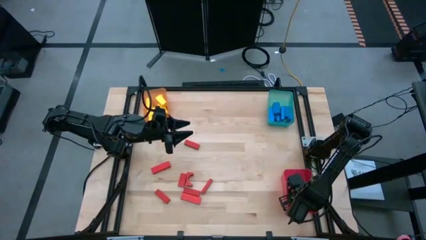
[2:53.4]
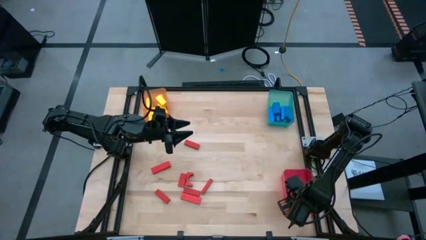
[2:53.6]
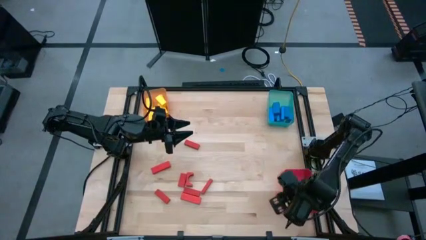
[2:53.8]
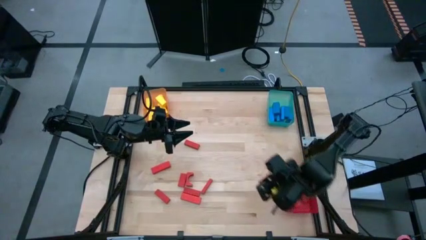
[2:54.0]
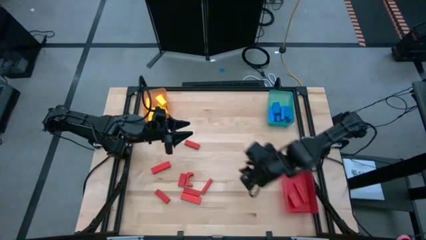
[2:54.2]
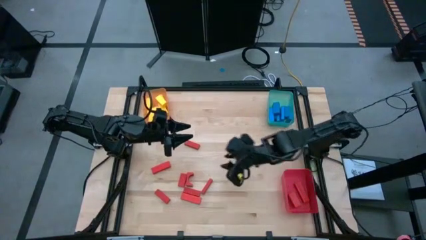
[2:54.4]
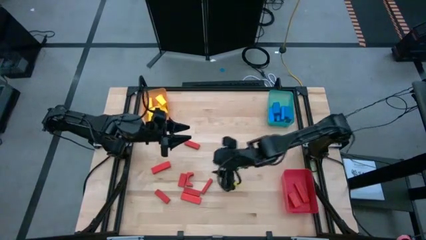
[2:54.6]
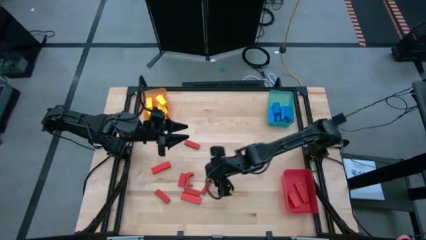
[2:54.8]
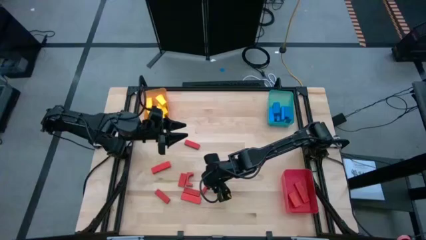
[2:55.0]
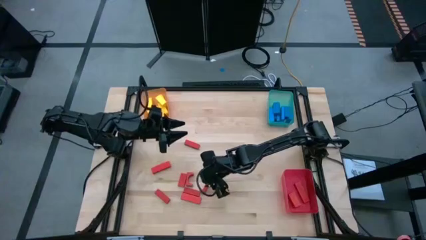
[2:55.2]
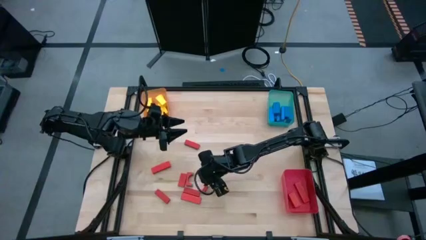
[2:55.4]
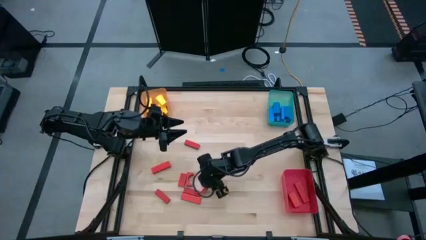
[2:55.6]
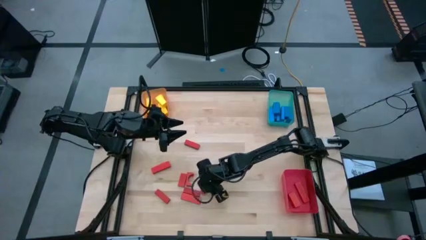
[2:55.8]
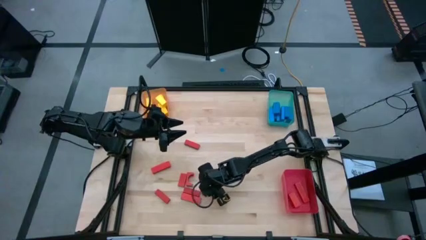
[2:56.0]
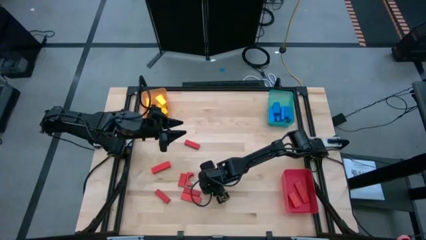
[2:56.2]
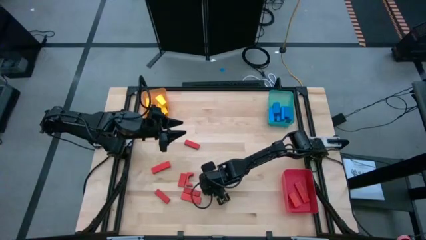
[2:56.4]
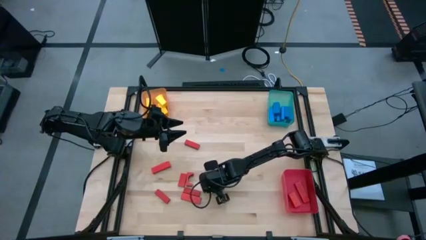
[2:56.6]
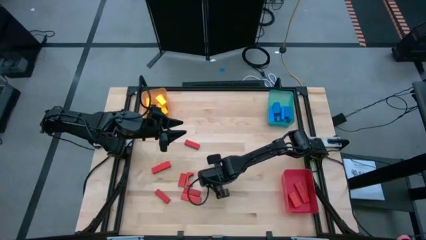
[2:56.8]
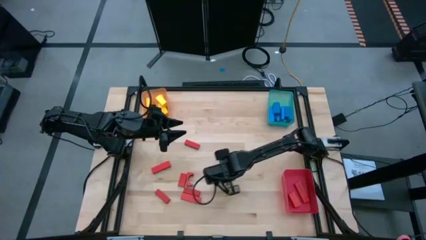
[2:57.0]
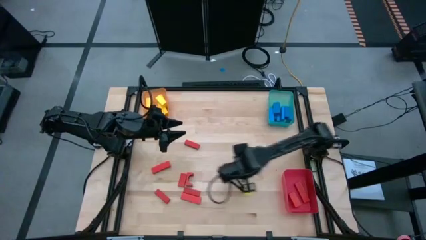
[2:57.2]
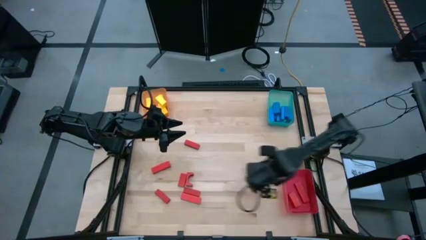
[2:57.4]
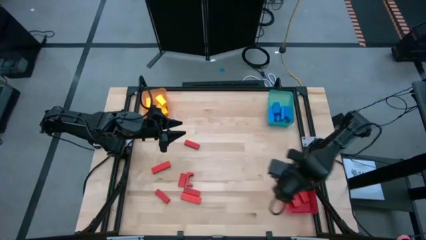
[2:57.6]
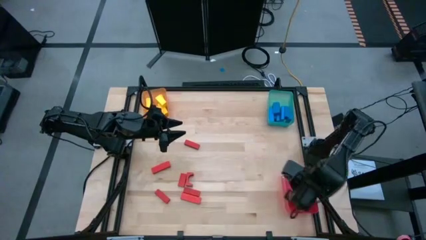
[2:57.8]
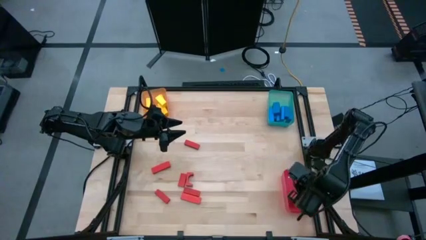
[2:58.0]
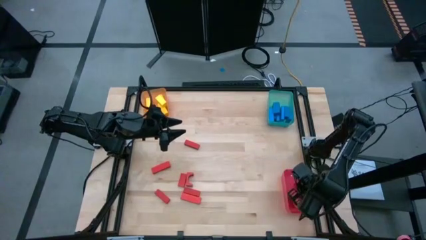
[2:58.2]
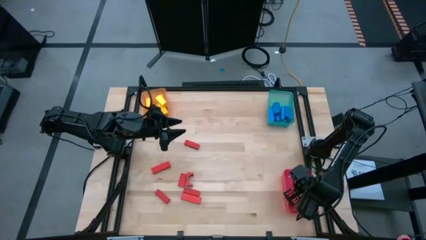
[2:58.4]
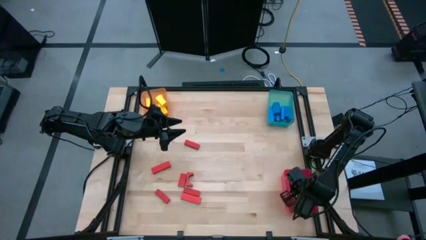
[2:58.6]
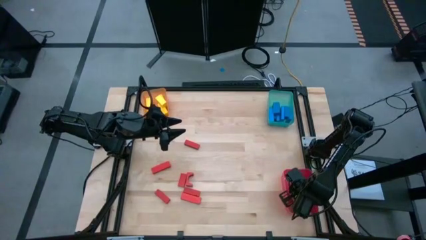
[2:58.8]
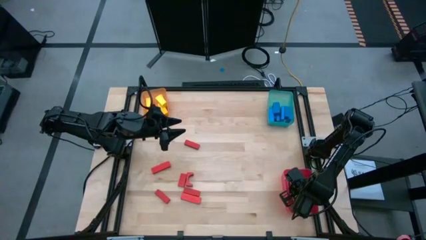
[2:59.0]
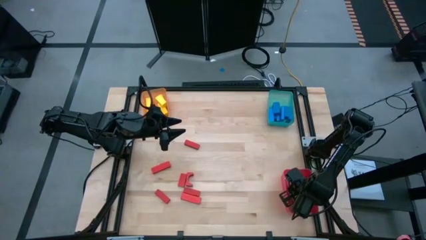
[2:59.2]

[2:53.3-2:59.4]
Task: Sort blocks
Put the red block into the red bin

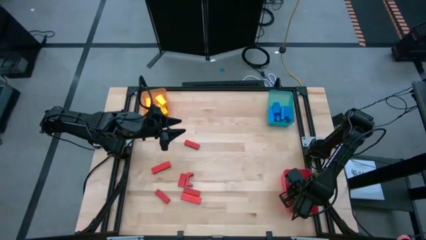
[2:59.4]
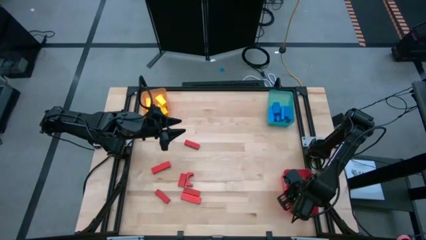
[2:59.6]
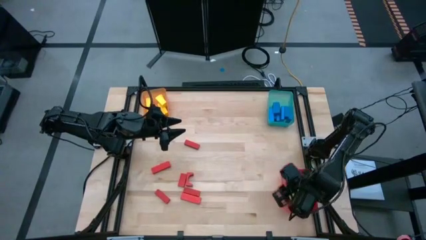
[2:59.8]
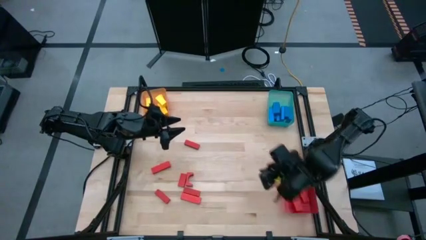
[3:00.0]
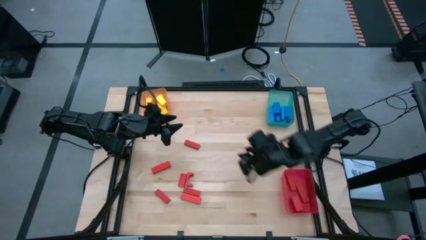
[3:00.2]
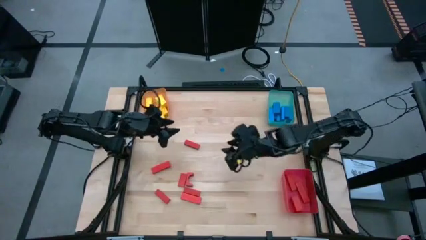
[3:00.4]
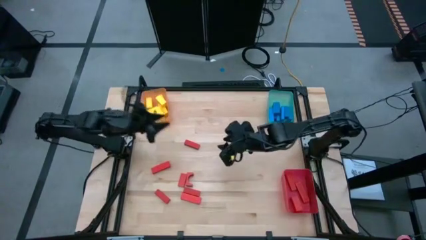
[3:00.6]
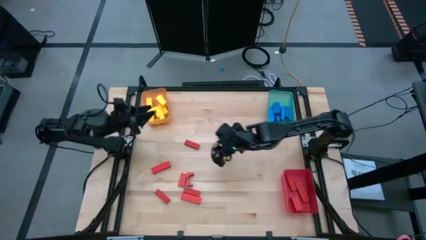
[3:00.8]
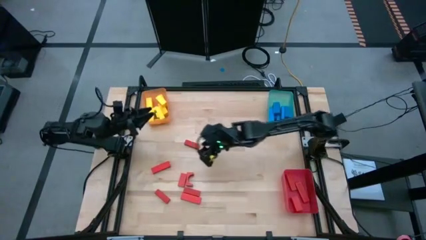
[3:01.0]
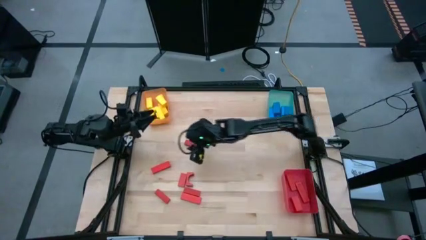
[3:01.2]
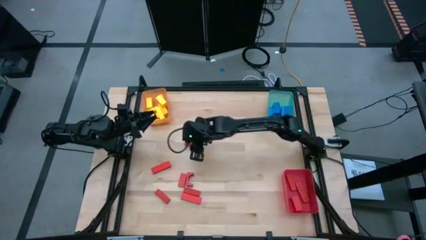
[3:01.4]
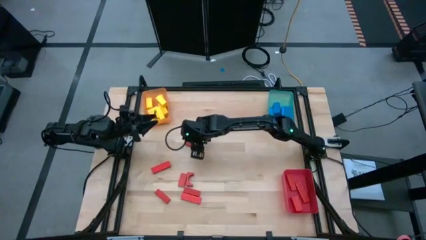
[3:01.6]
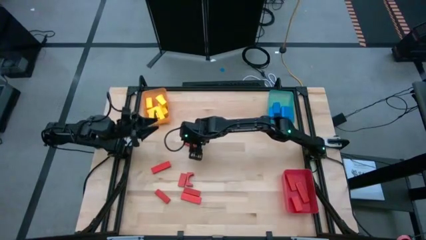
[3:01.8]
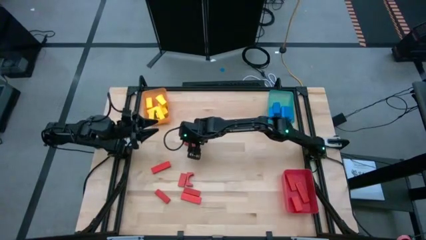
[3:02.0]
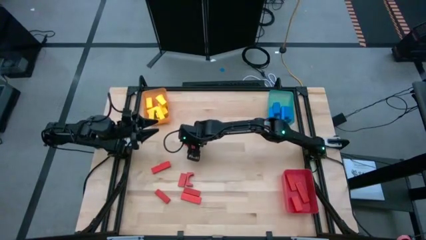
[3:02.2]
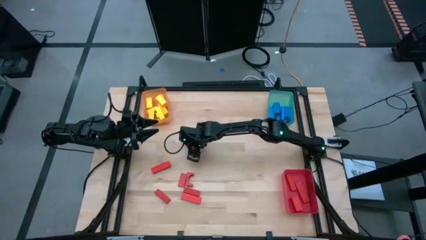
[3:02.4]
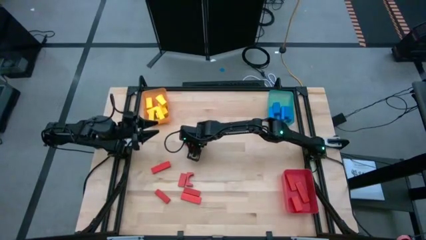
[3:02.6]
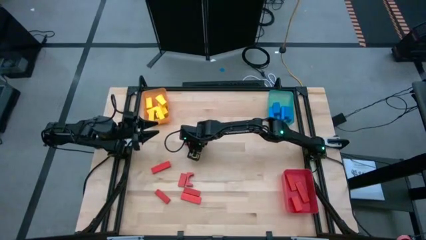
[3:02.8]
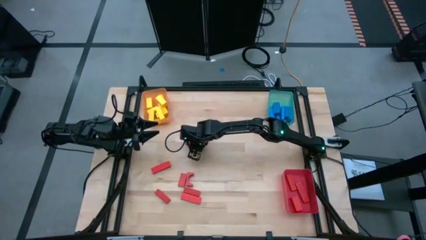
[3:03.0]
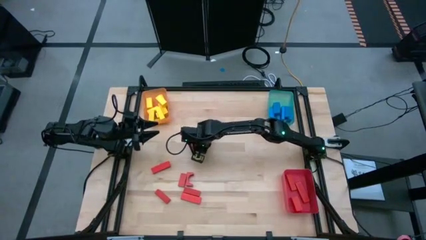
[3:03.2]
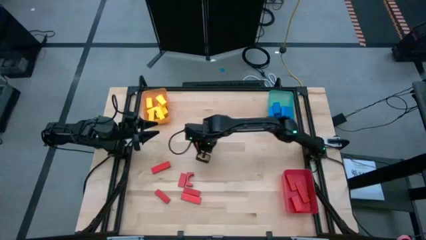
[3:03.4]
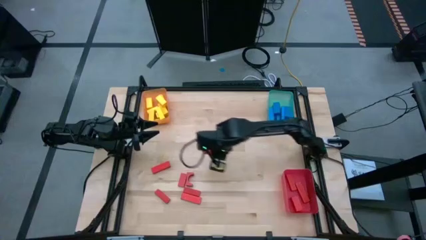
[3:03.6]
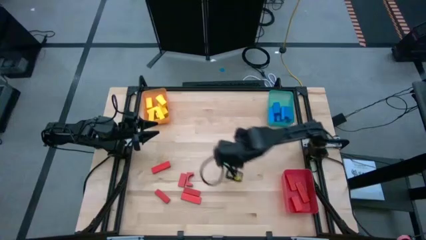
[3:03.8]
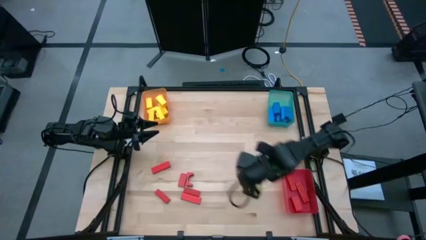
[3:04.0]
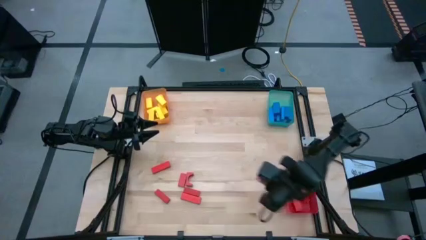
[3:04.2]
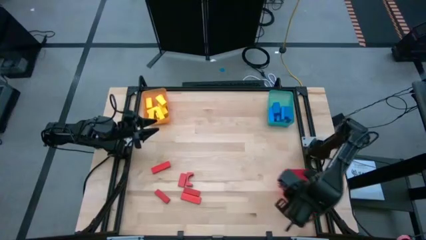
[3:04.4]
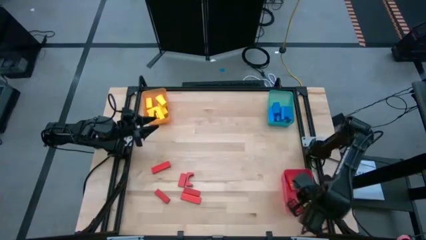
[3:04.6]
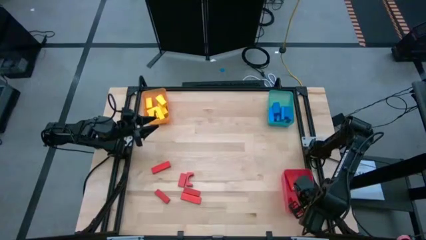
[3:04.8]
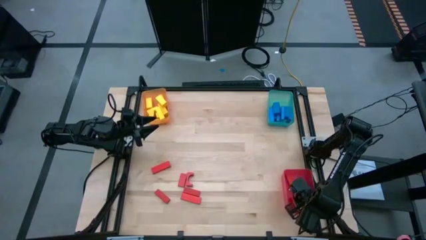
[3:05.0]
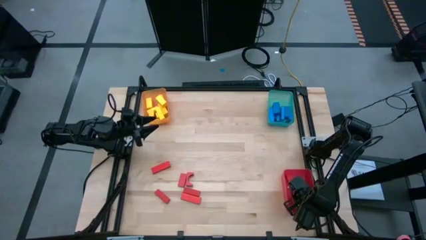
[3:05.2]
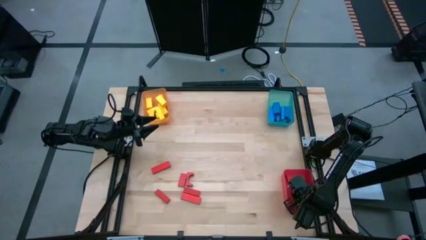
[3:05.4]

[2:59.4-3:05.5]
Put the red block into the red bin

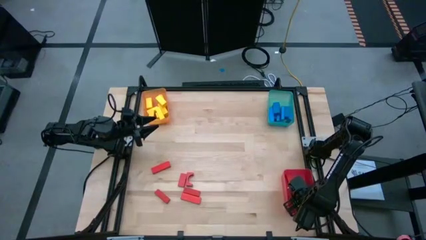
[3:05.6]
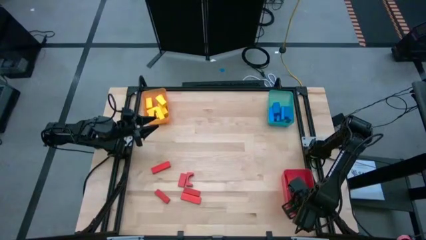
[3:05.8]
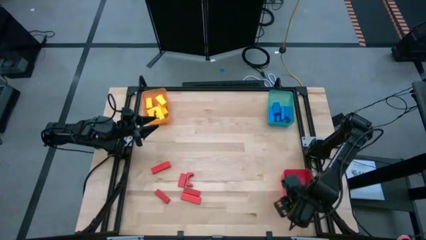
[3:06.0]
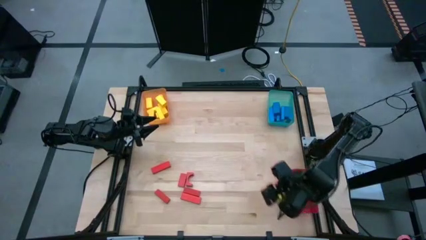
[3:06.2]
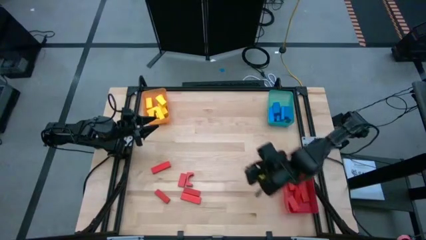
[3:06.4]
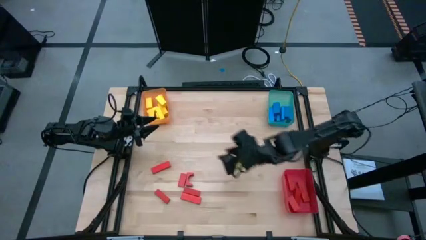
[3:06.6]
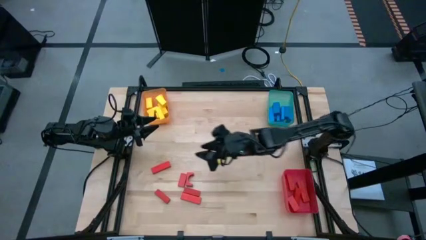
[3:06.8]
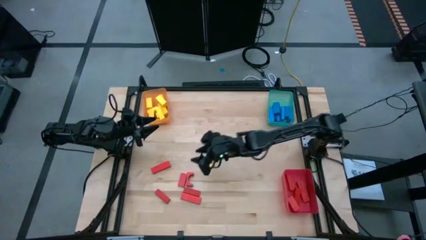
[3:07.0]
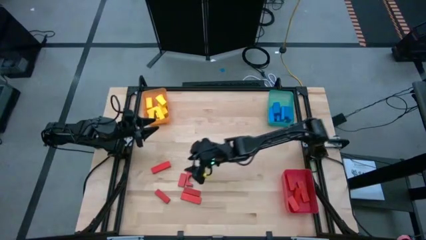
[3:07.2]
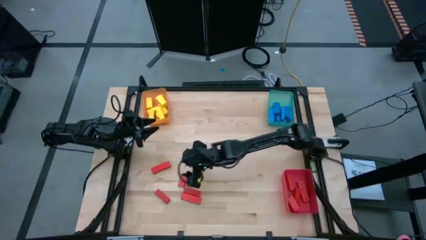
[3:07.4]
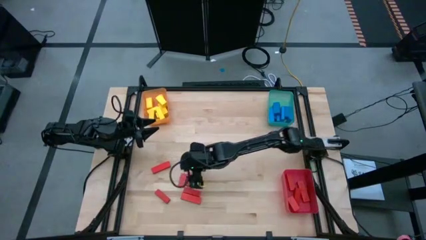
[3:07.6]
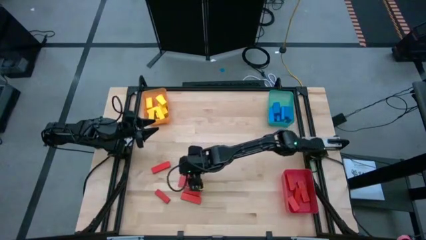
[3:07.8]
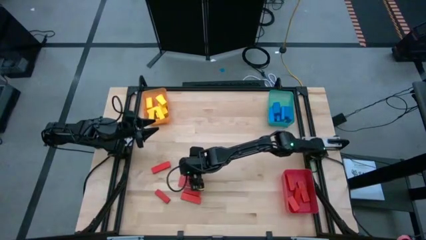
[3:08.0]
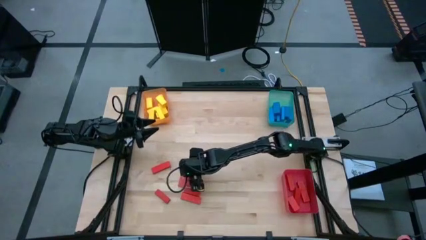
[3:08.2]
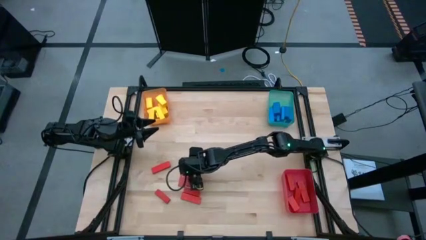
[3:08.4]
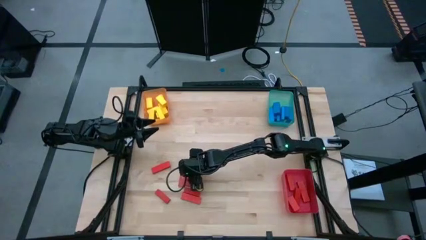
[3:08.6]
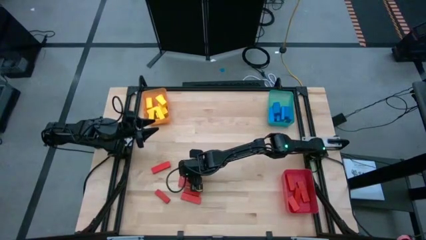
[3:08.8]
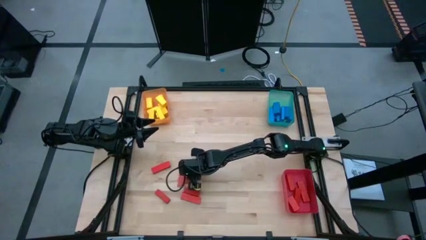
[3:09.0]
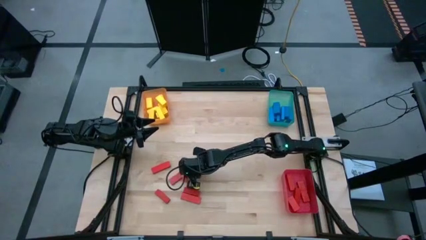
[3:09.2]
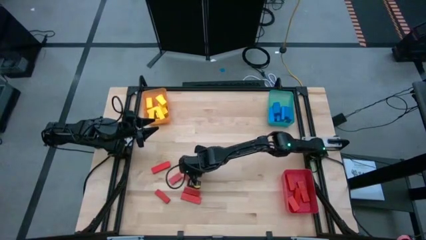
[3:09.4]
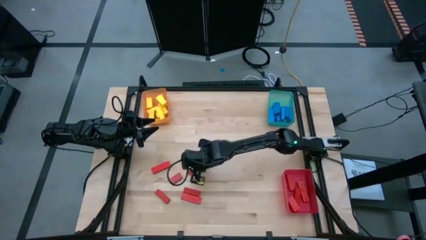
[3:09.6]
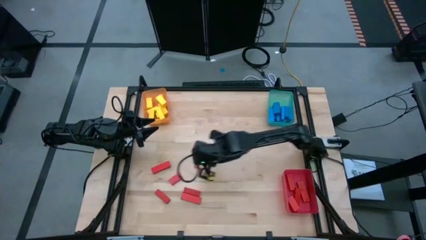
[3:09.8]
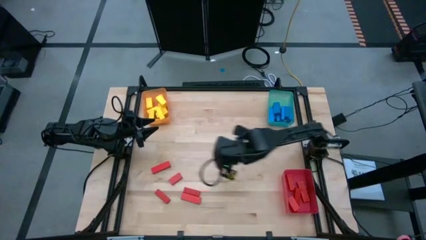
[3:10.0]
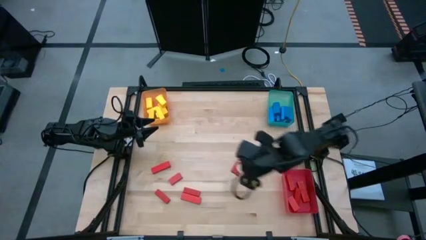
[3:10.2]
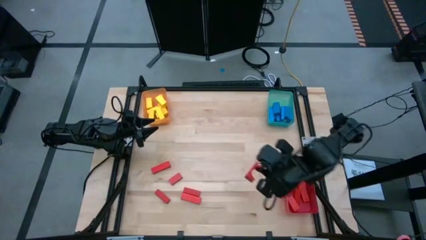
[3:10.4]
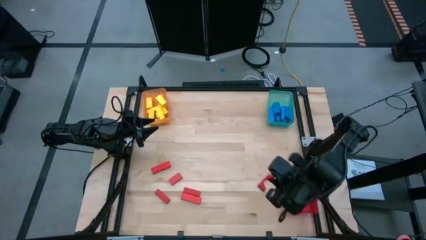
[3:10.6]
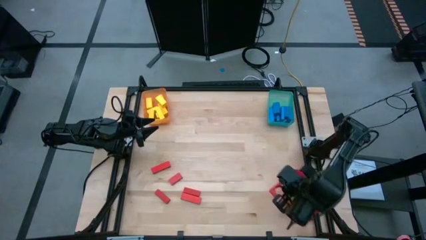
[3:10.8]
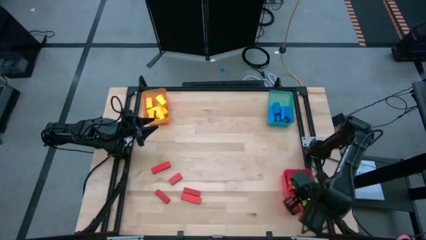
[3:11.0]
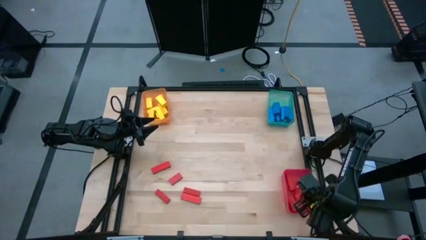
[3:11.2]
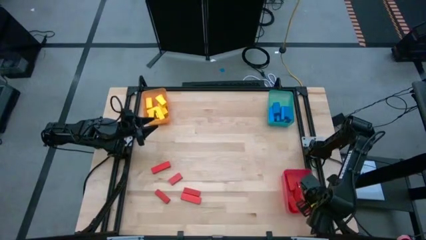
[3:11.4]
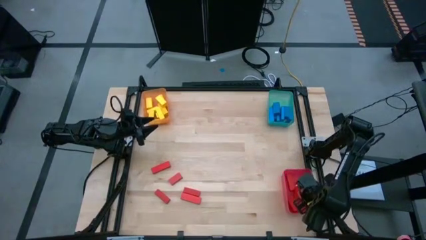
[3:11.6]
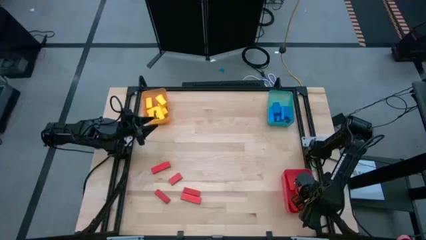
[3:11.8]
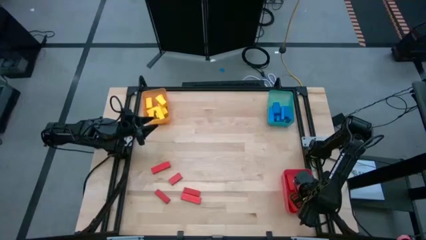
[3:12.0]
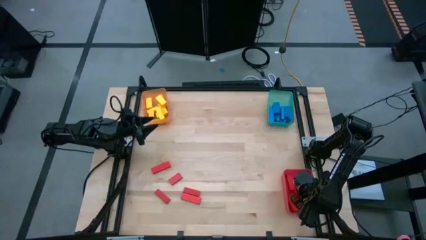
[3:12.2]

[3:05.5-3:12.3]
Put the red block into the red bin
